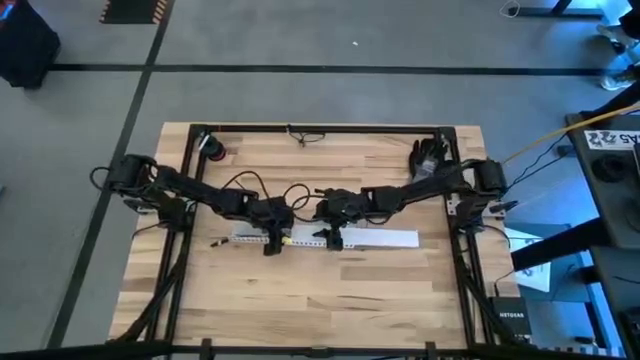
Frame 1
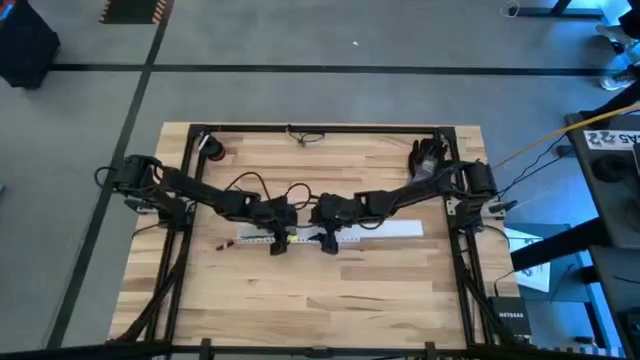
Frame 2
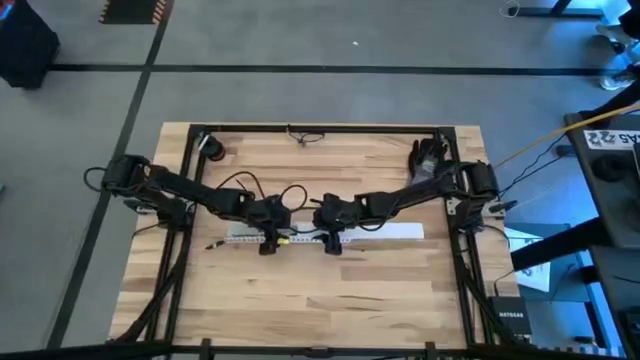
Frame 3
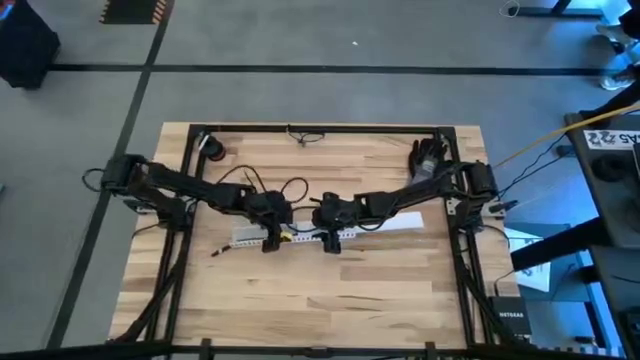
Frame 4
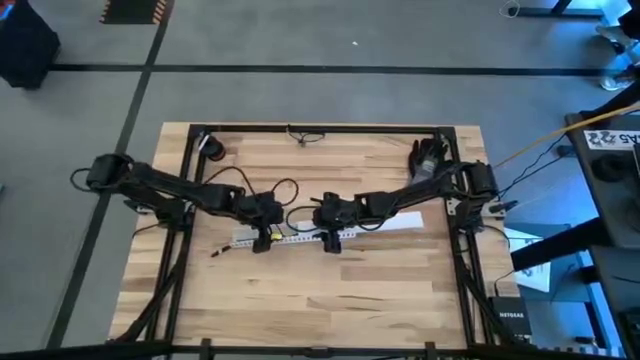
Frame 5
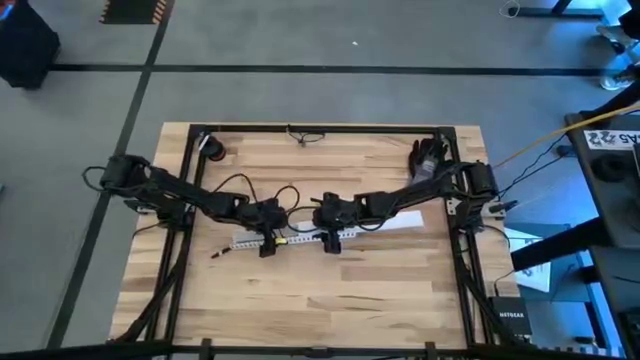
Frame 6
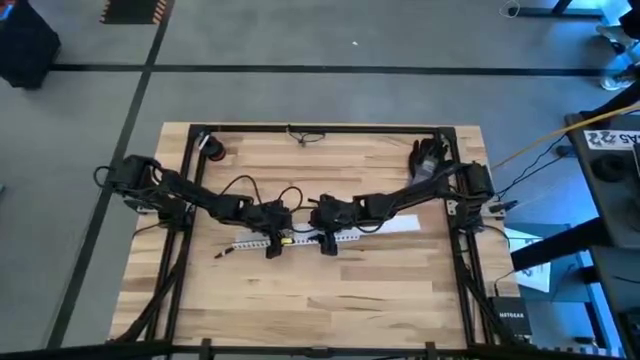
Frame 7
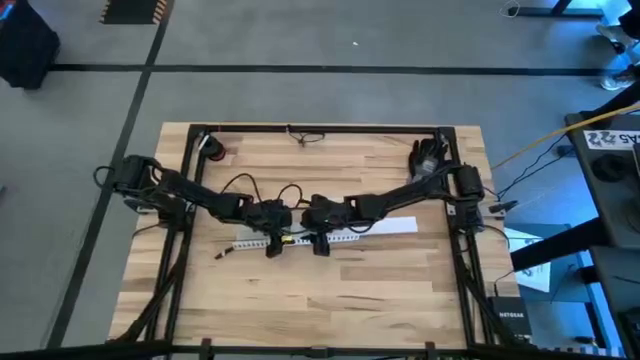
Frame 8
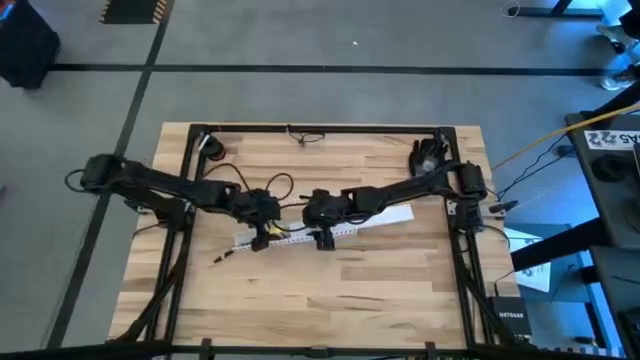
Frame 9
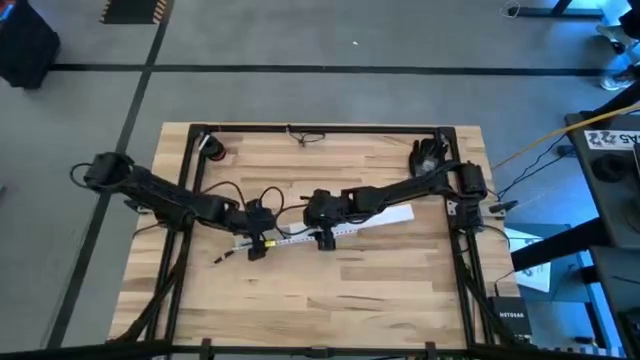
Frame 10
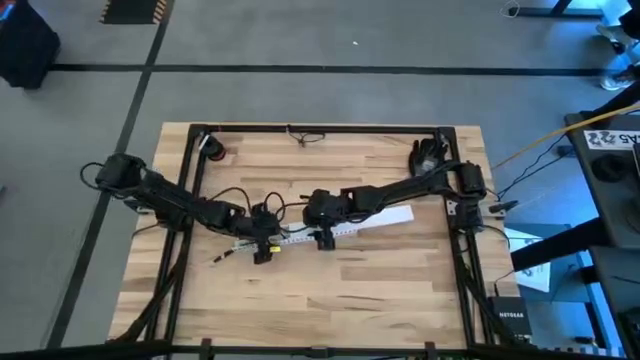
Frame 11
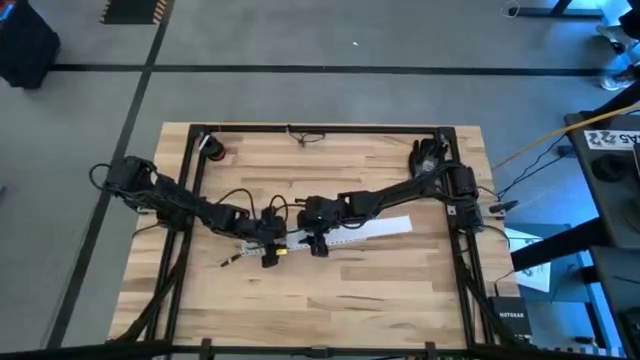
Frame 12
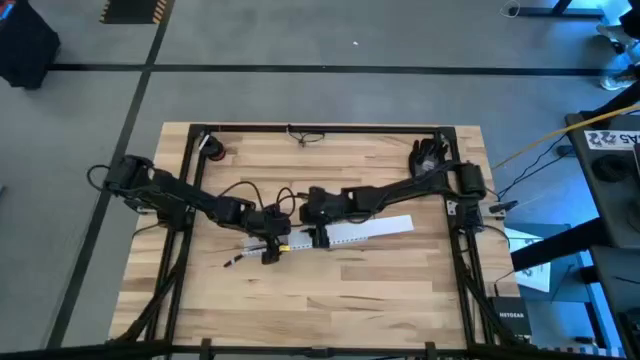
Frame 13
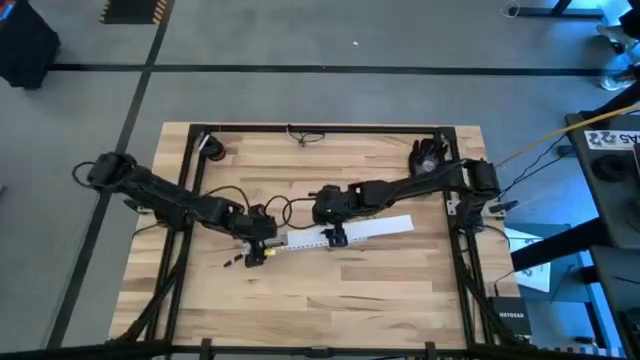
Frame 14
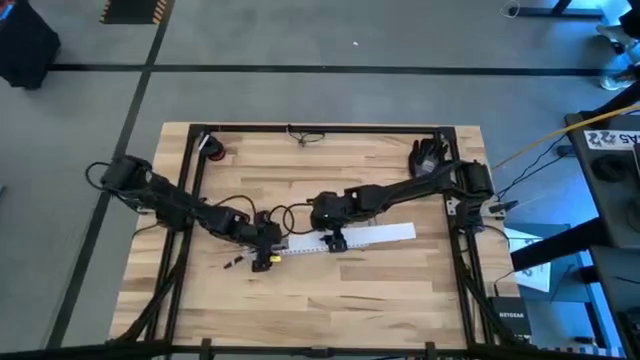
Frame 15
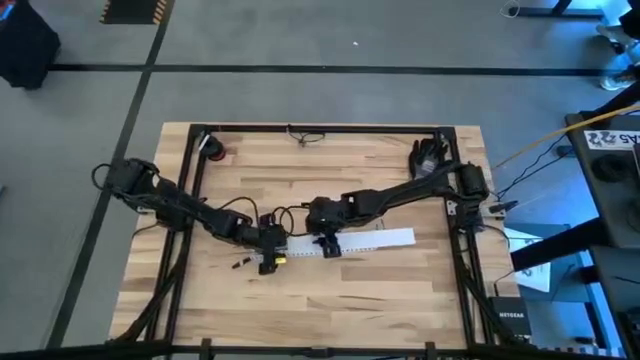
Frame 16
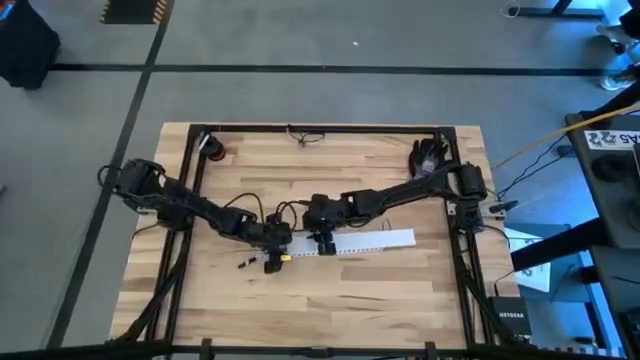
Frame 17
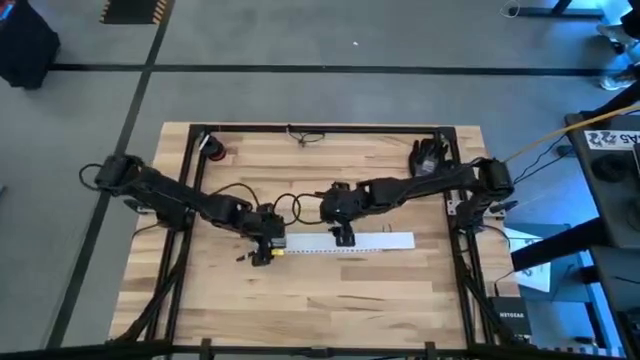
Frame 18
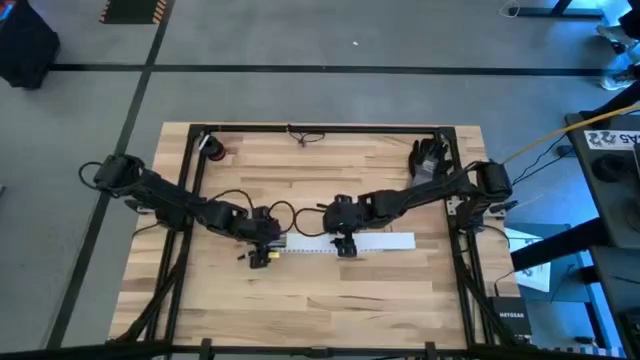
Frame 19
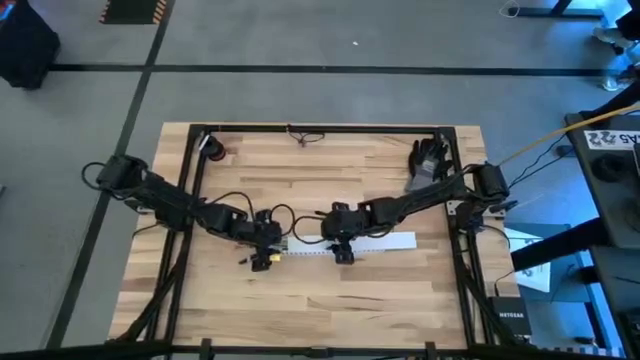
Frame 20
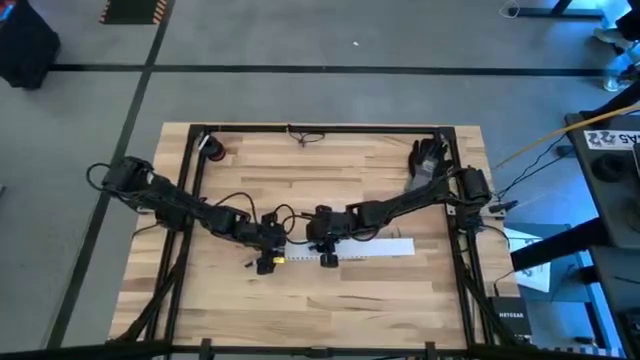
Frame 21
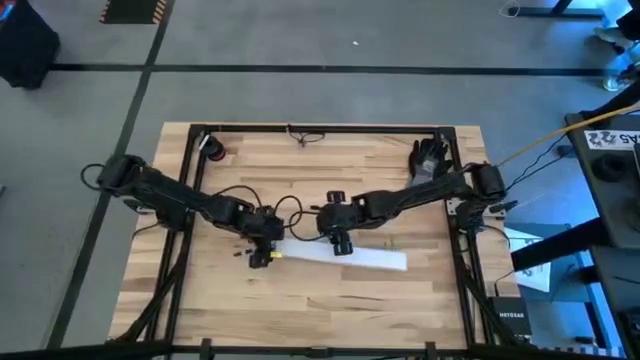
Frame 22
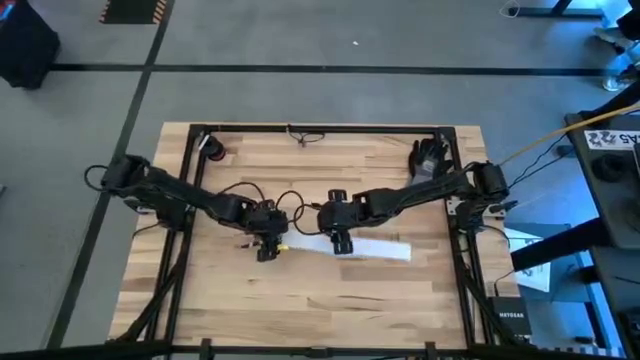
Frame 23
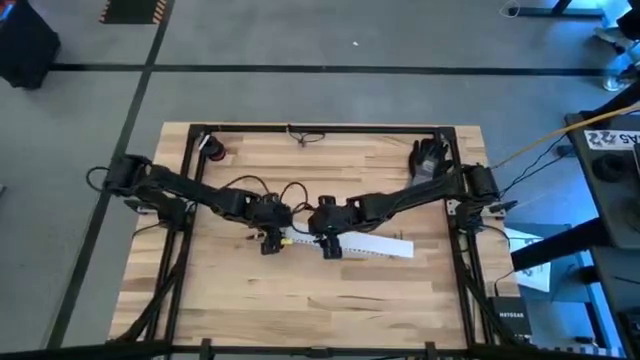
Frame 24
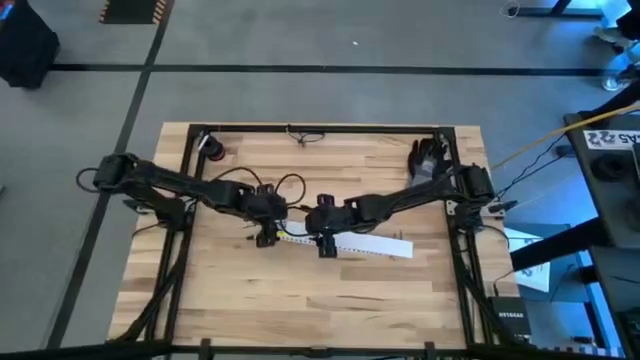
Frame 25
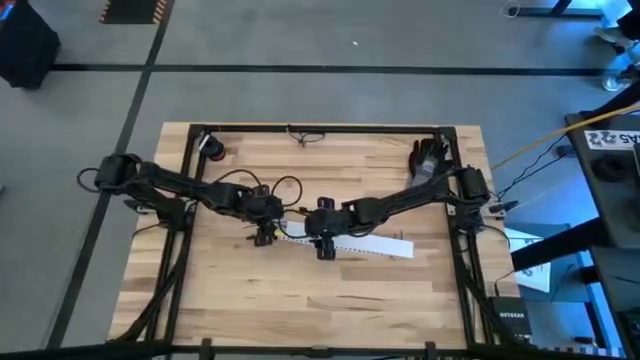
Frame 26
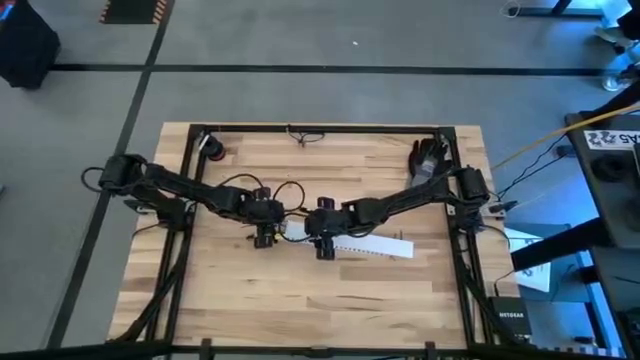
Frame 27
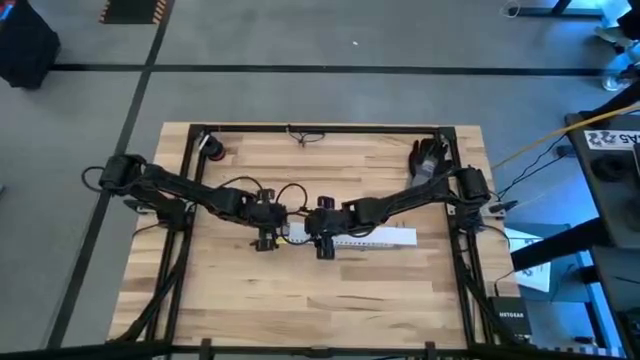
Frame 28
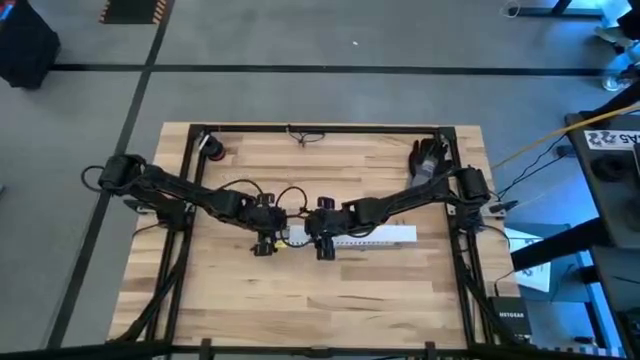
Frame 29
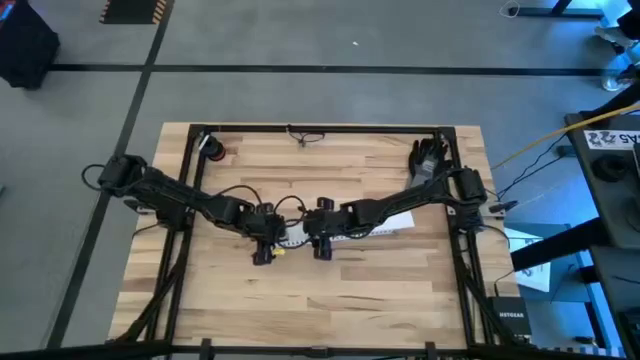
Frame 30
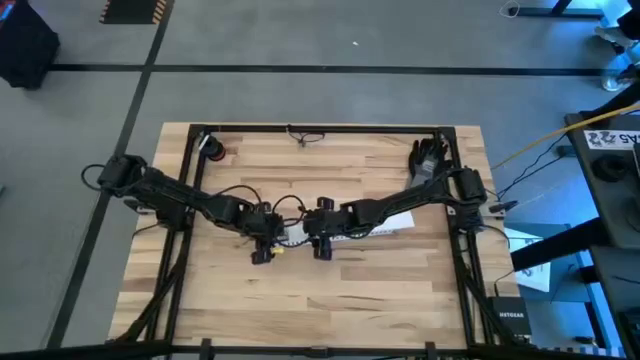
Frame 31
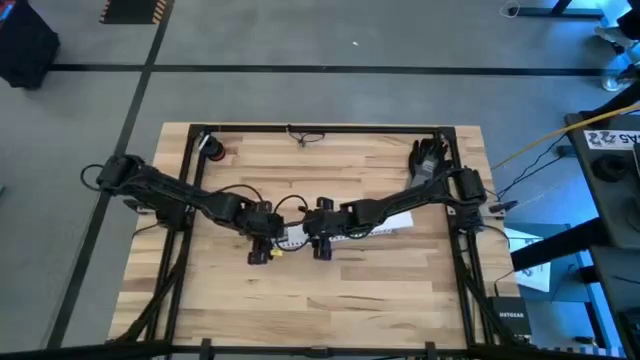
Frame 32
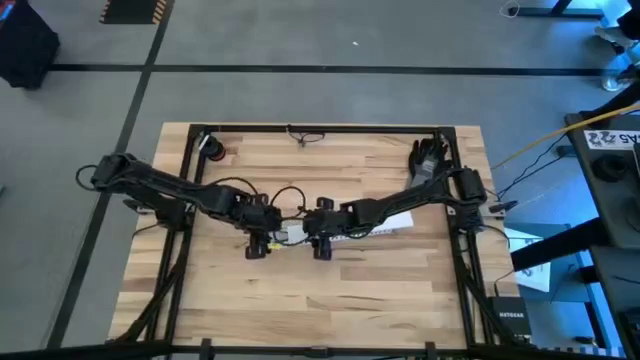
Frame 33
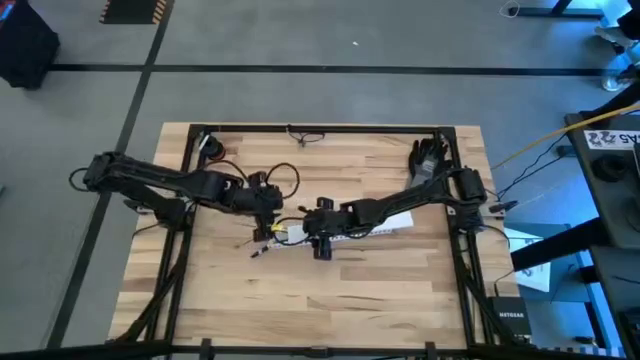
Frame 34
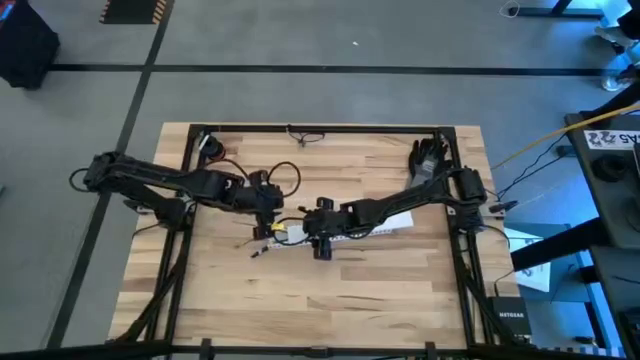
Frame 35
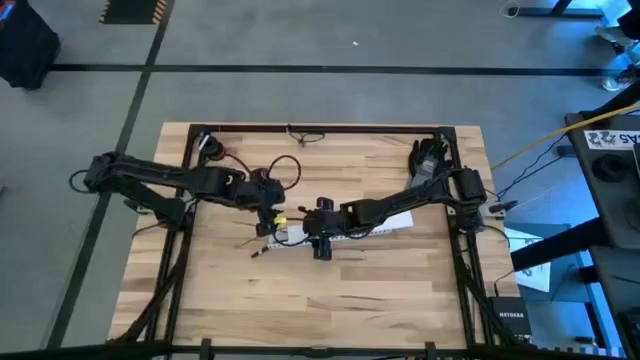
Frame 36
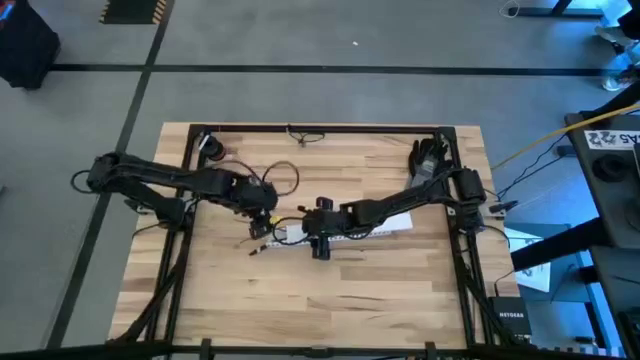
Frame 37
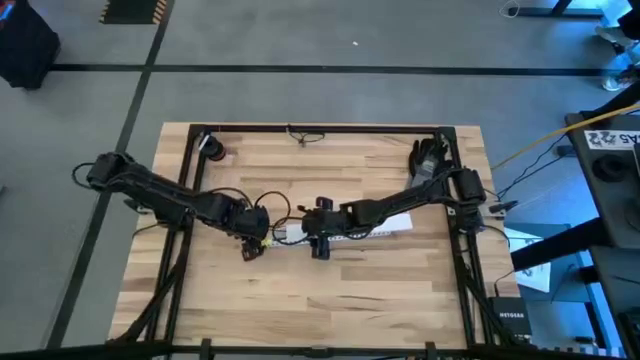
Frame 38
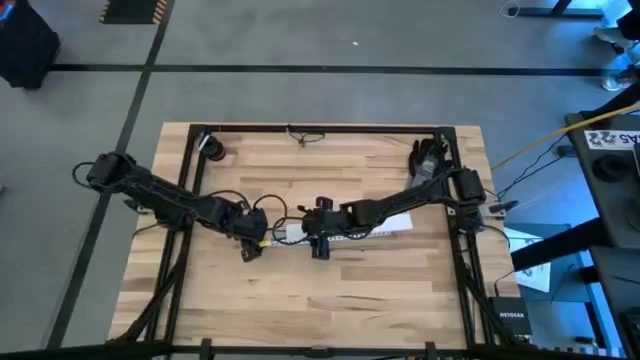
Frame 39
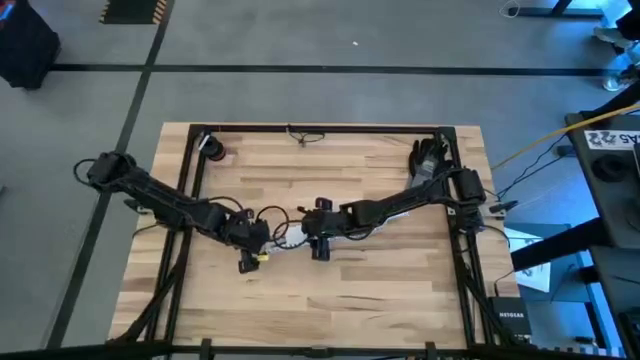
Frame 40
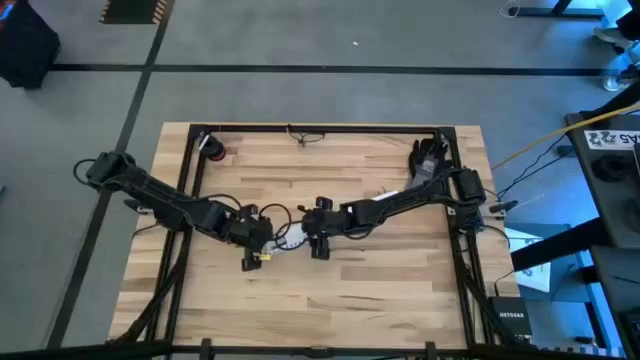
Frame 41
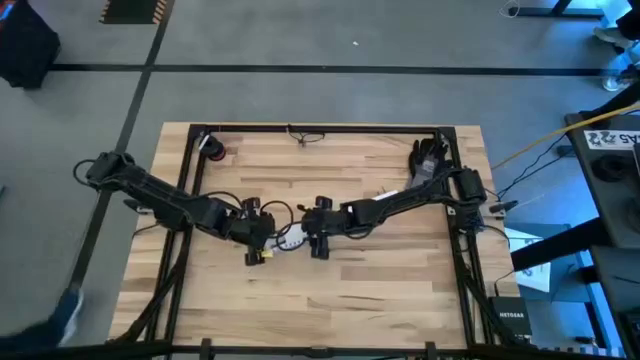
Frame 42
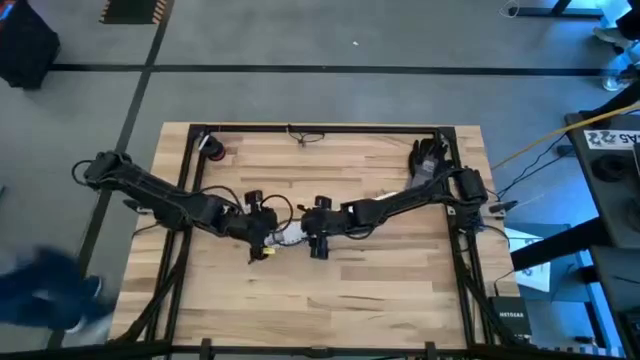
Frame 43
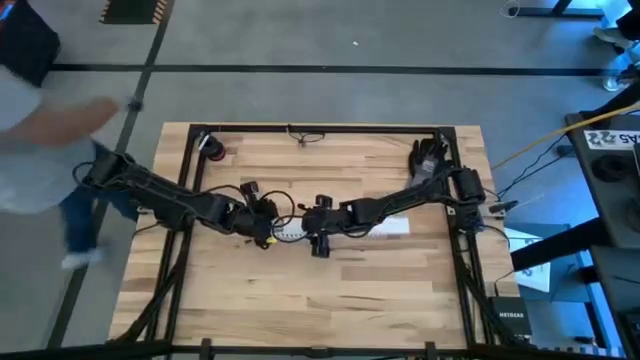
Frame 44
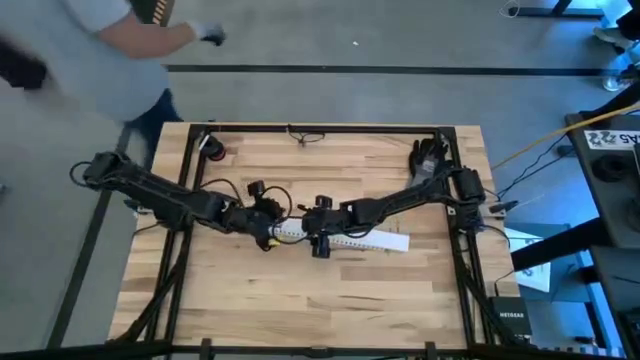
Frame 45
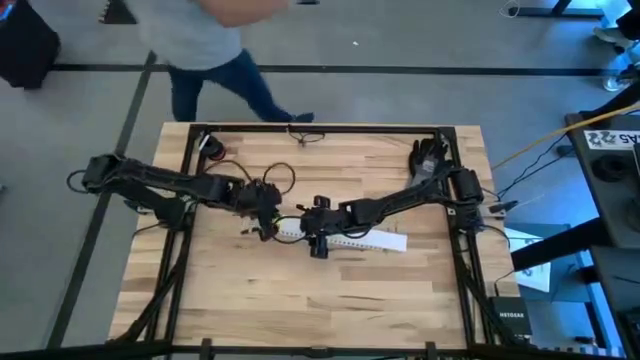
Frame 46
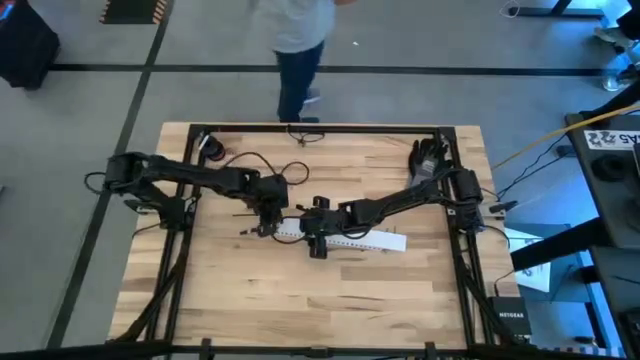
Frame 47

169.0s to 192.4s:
Task: Ziptie cables
Close the cable duct
